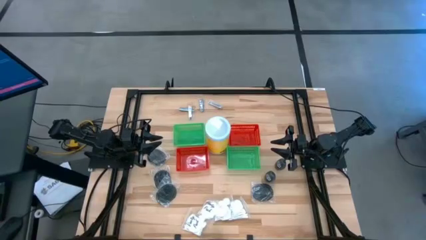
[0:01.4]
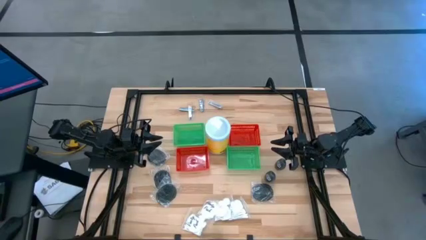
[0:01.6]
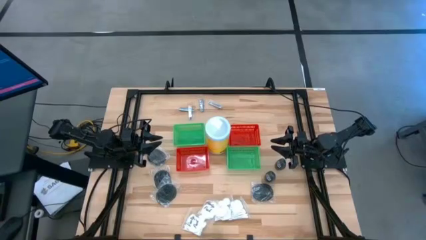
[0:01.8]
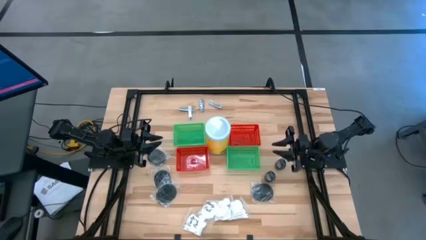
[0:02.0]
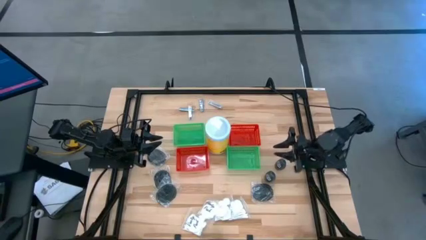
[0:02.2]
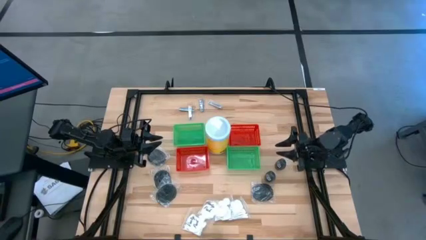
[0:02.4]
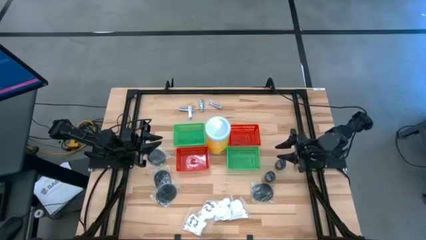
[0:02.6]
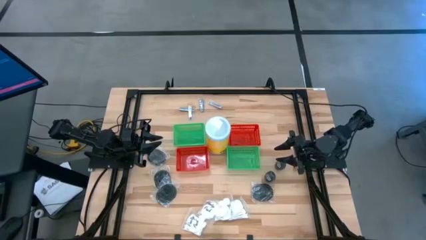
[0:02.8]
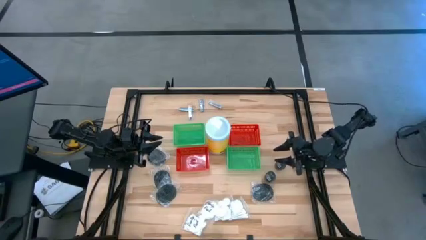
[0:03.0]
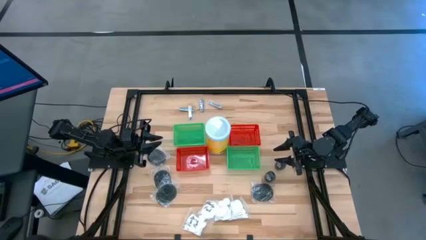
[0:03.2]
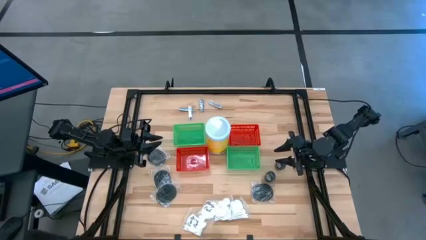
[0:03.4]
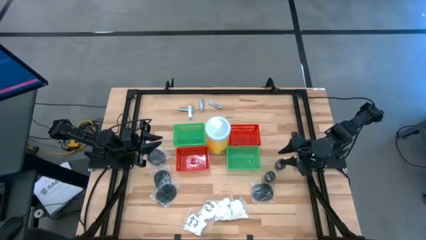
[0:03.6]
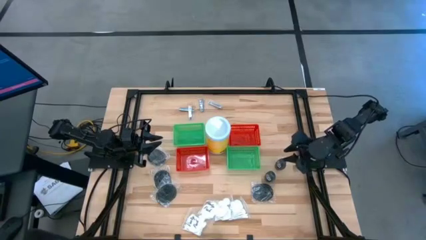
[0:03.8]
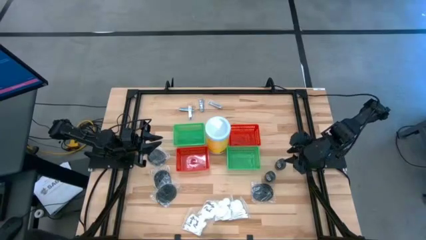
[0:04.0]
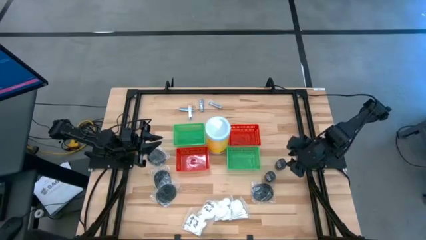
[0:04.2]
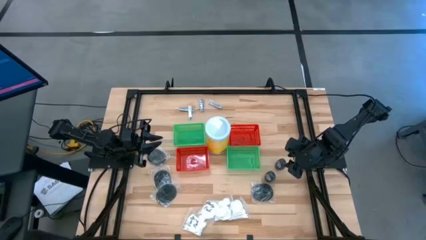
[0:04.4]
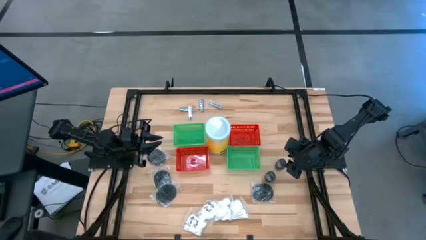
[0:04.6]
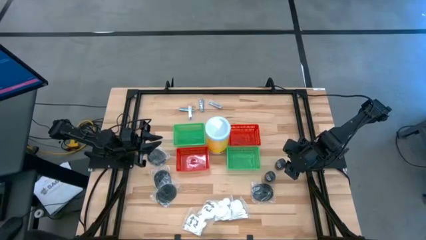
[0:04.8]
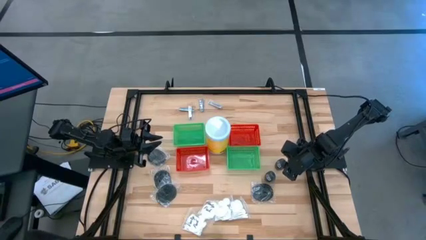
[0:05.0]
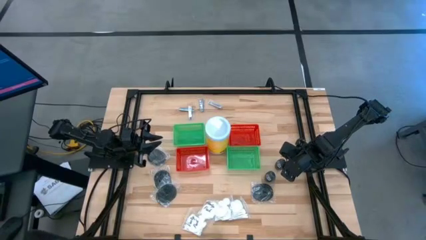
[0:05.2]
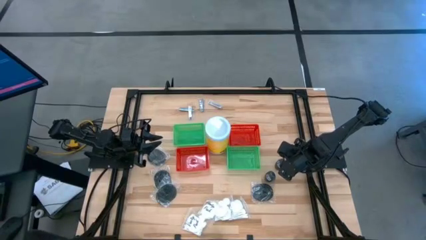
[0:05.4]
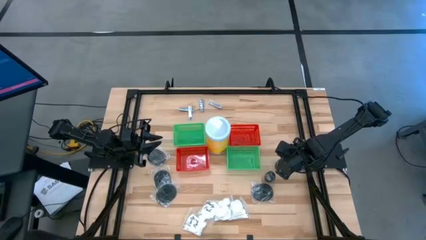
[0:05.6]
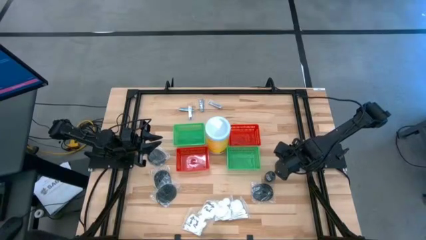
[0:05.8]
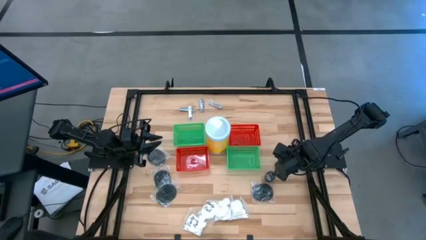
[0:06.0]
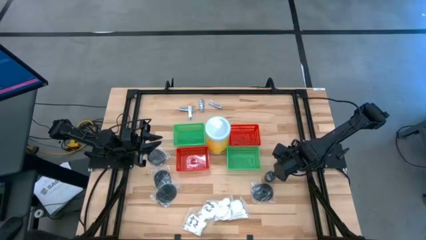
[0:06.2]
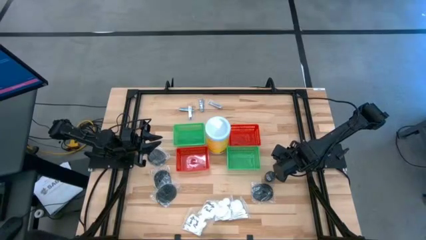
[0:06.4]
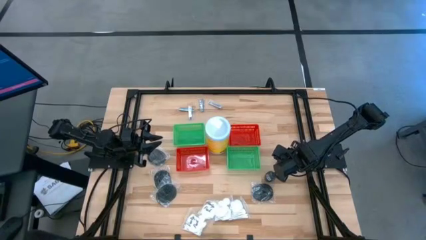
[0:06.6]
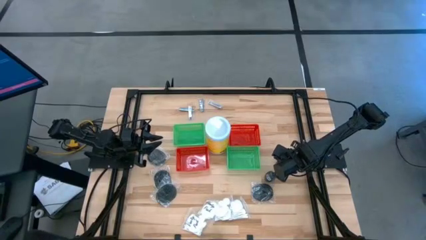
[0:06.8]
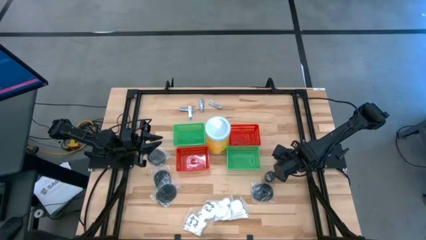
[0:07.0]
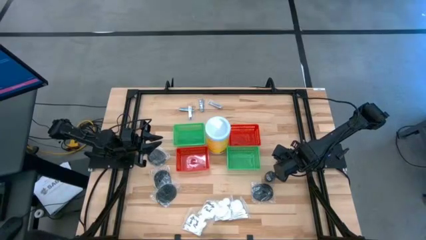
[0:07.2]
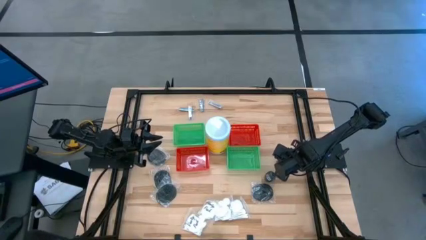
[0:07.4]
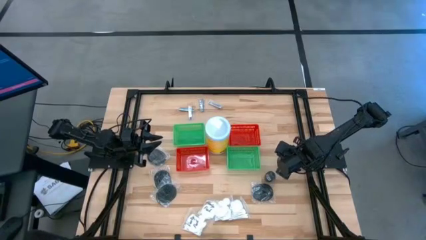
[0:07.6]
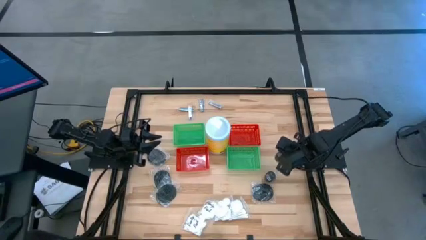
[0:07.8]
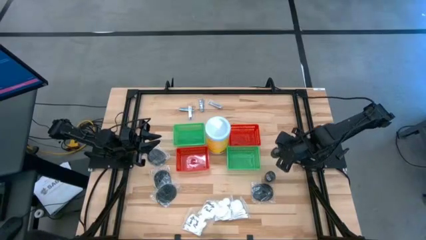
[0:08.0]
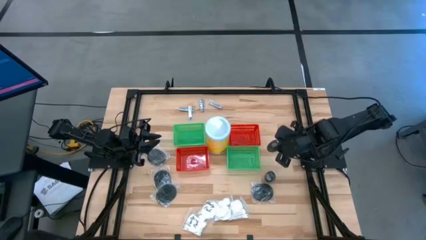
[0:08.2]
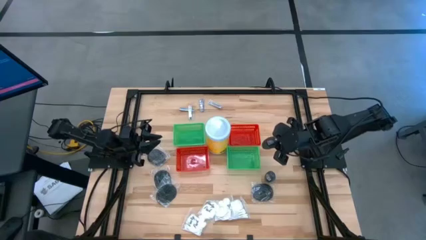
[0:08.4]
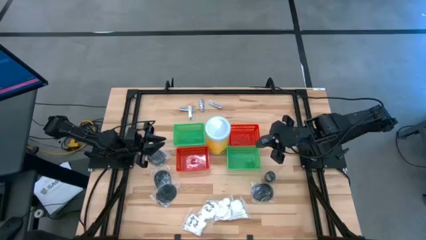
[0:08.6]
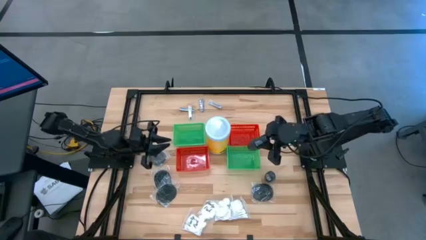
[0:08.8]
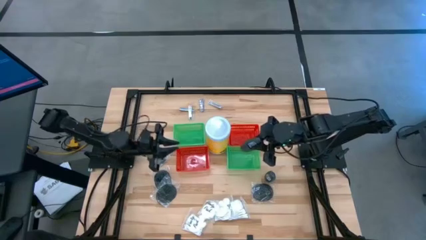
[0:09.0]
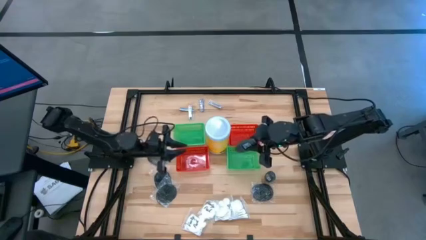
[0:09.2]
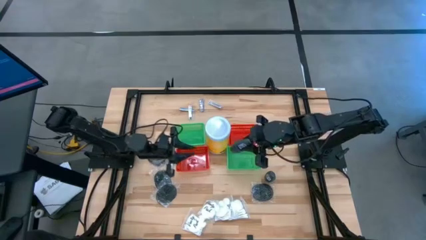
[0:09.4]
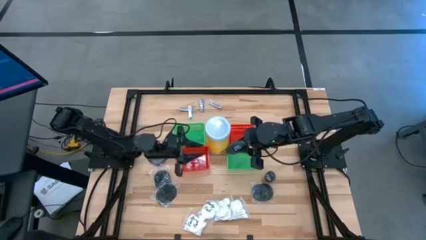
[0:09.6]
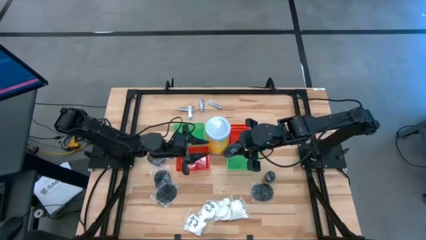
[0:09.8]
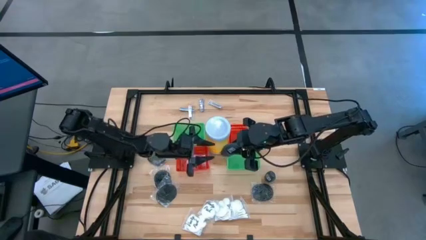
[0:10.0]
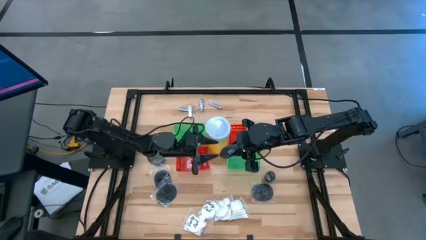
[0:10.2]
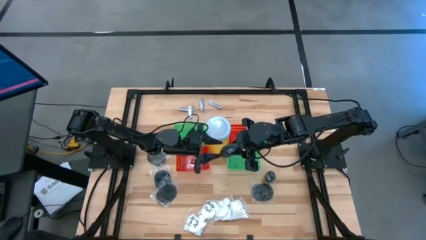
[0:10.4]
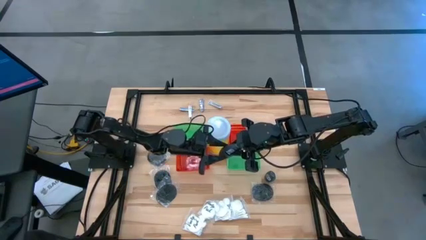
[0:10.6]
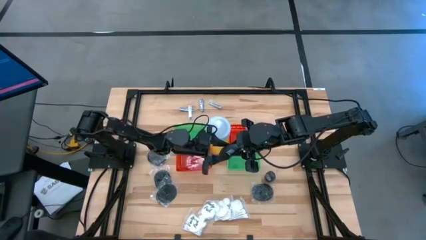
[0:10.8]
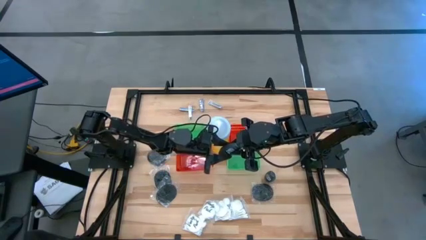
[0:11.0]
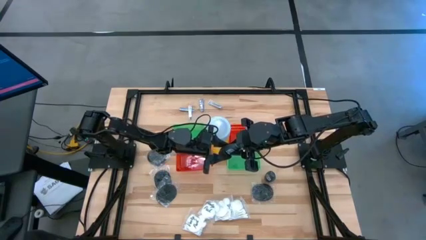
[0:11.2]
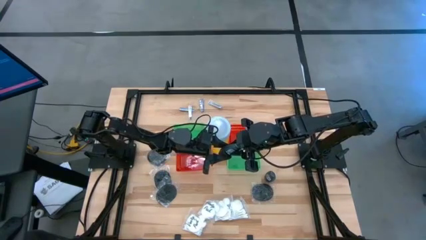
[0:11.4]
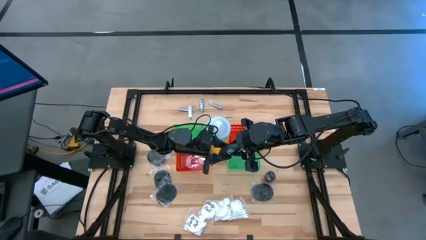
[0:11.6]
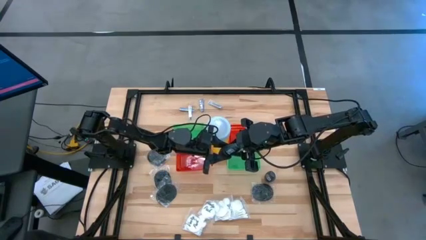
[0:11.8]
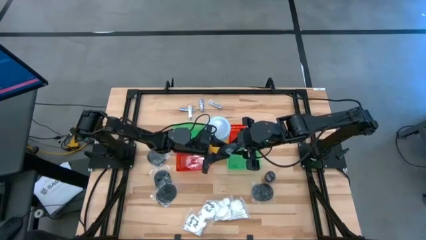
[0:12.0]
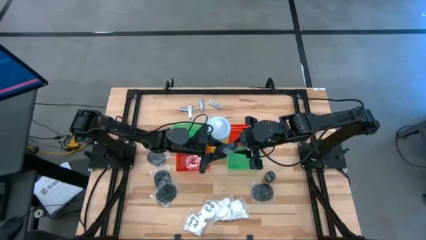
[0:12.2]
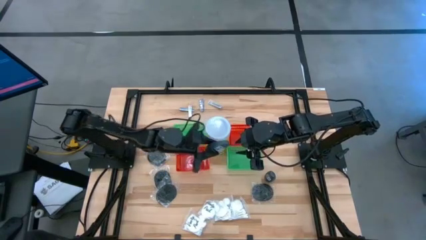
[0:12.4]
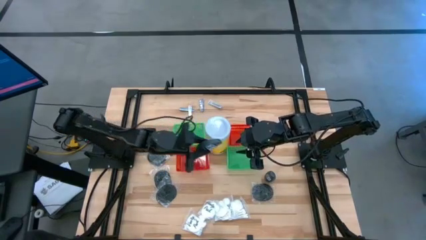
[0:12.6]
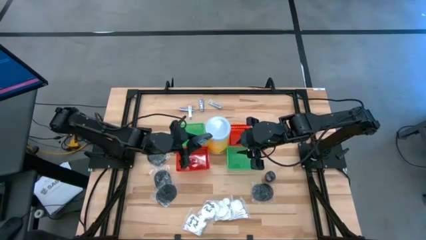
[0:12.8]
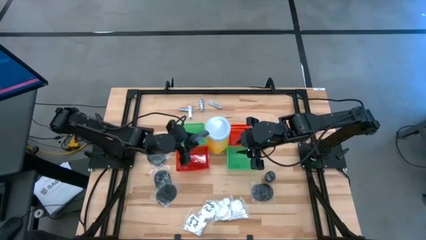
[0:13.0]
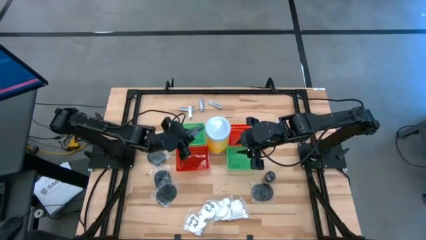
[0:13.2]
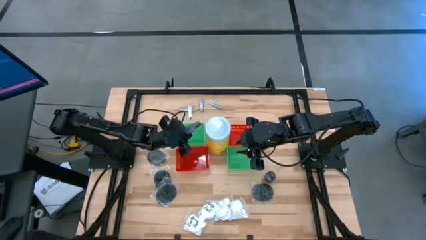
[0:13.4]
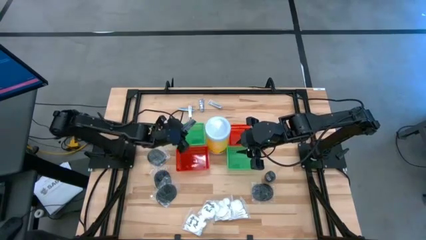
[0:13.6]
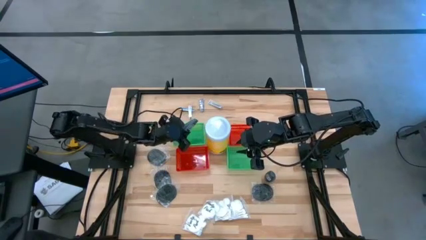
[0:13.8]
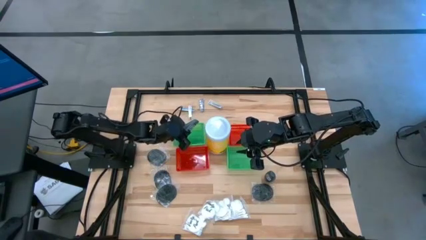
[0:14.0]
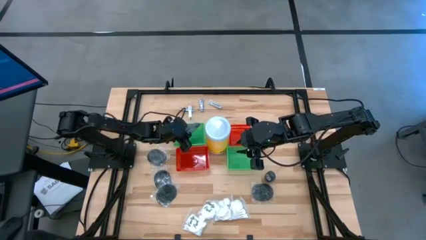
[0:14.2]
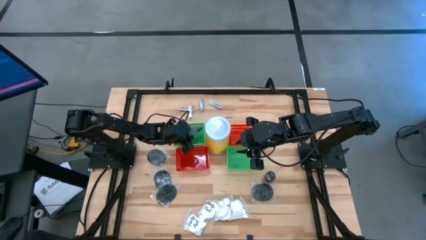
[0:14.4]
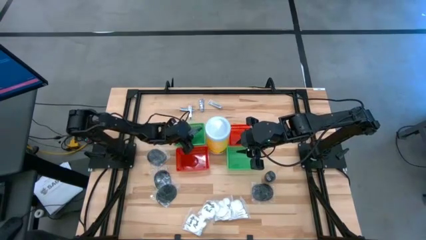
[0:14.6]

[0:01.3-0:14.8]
Task: Pick & Place Travel size toiletries
Put the black deodorant into the left green bin
